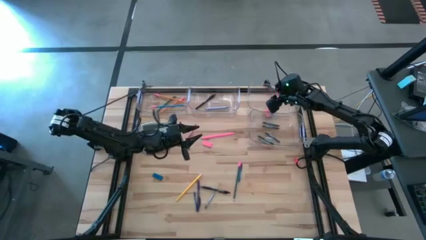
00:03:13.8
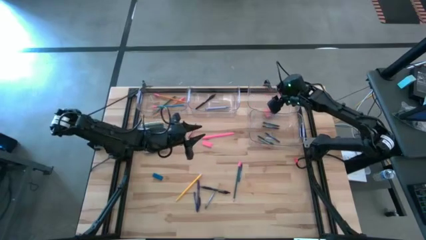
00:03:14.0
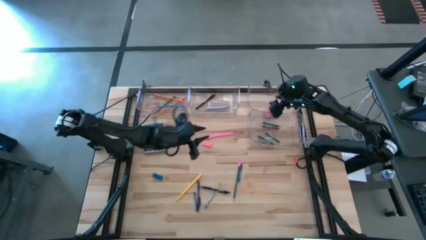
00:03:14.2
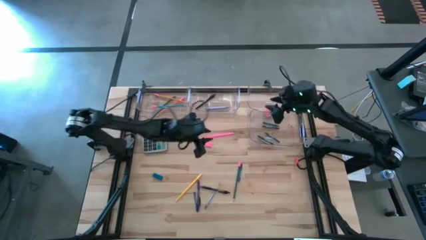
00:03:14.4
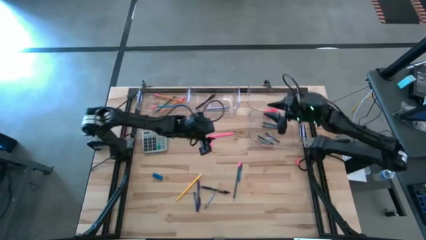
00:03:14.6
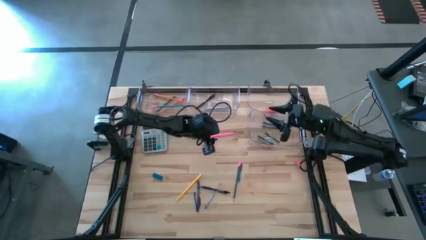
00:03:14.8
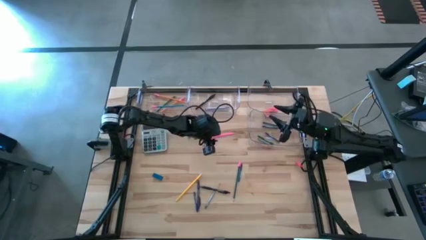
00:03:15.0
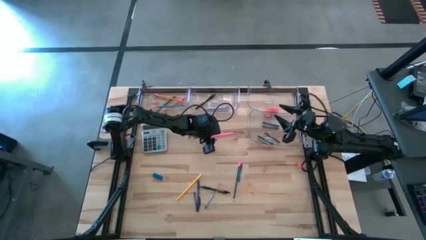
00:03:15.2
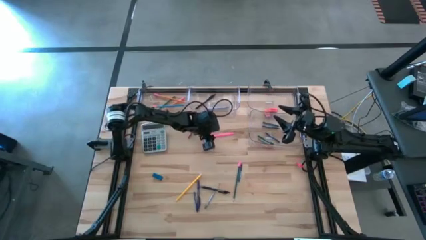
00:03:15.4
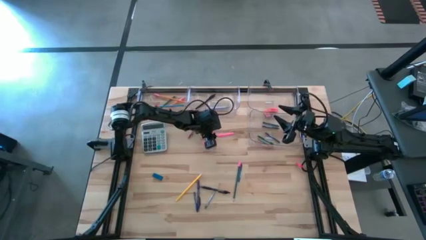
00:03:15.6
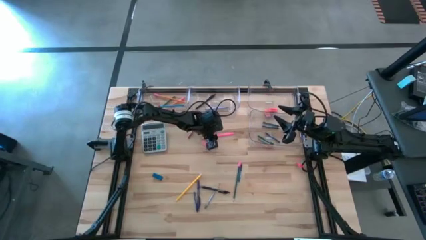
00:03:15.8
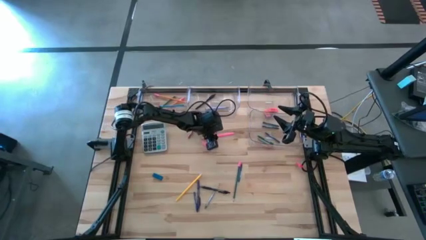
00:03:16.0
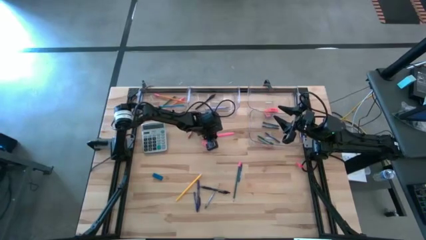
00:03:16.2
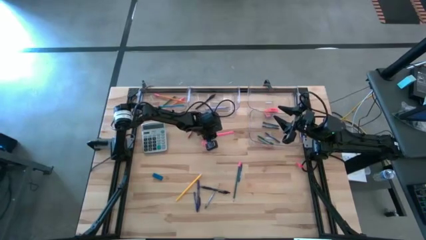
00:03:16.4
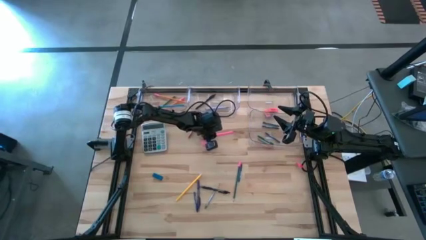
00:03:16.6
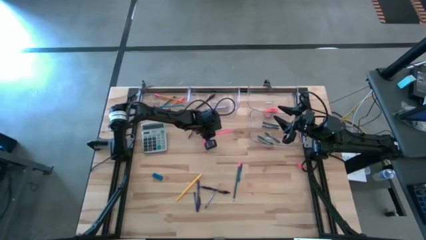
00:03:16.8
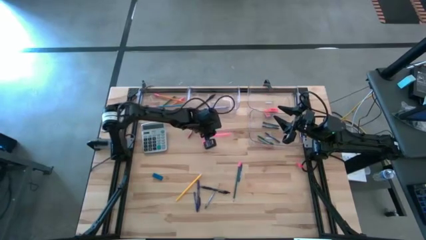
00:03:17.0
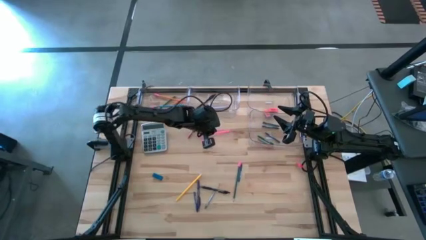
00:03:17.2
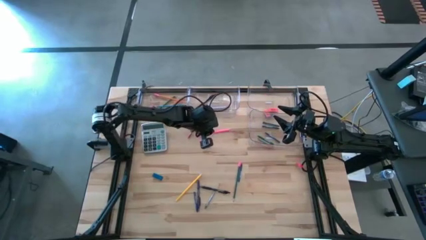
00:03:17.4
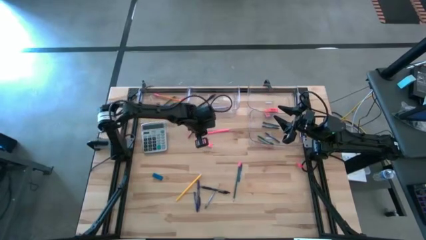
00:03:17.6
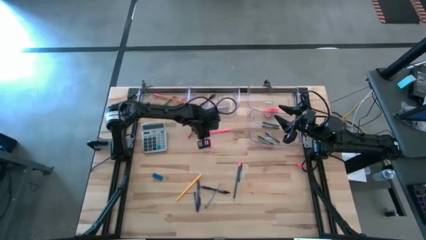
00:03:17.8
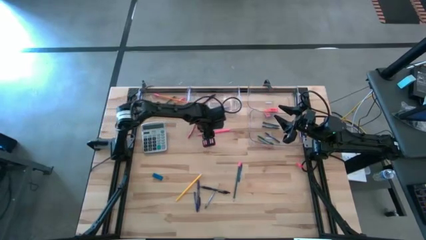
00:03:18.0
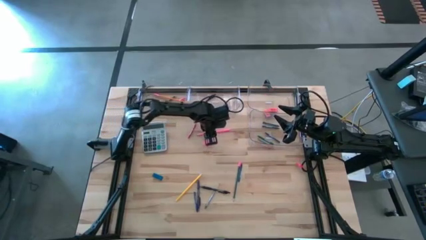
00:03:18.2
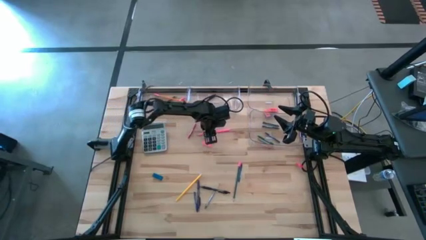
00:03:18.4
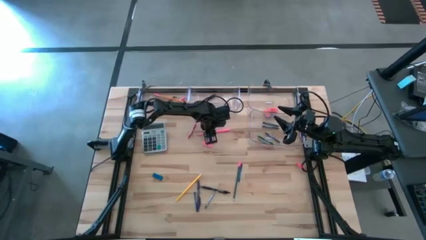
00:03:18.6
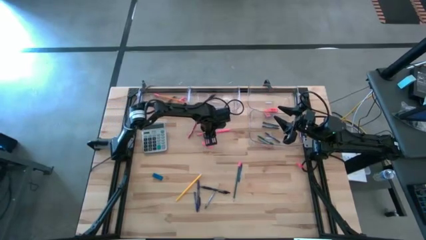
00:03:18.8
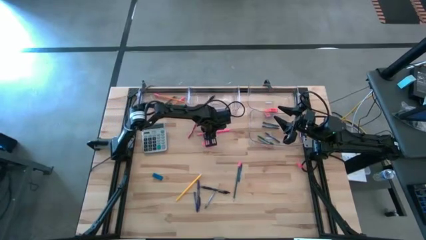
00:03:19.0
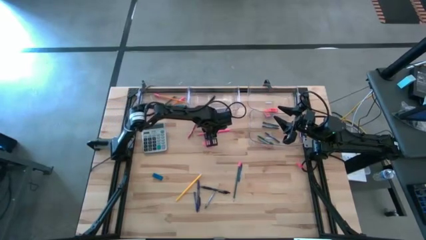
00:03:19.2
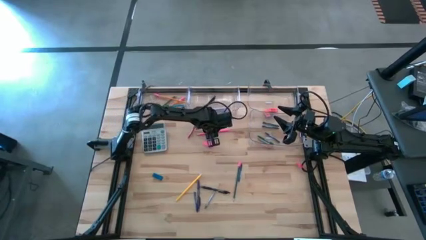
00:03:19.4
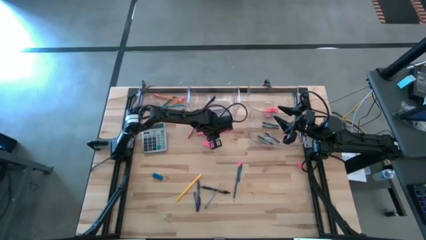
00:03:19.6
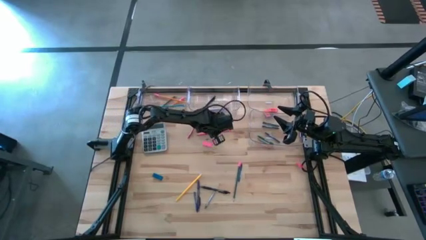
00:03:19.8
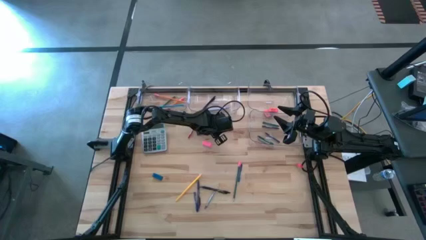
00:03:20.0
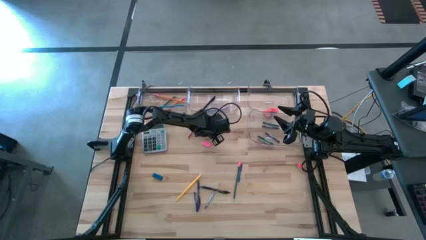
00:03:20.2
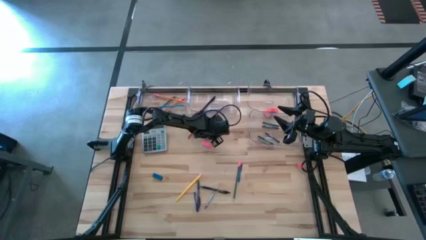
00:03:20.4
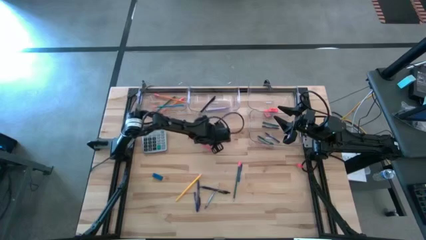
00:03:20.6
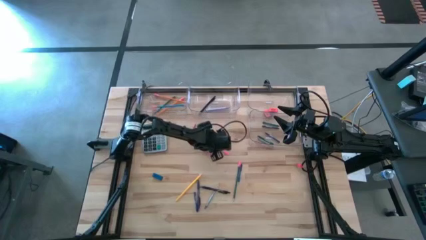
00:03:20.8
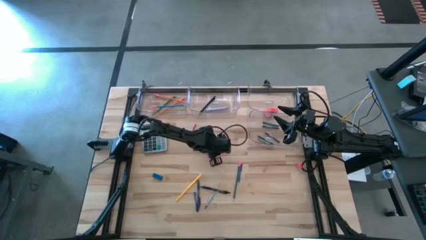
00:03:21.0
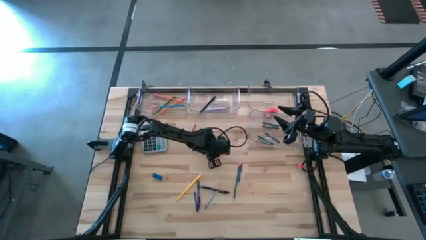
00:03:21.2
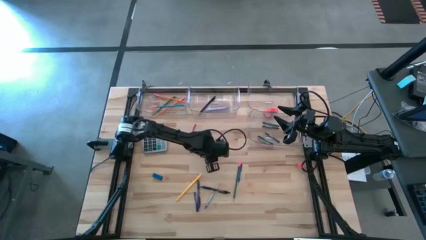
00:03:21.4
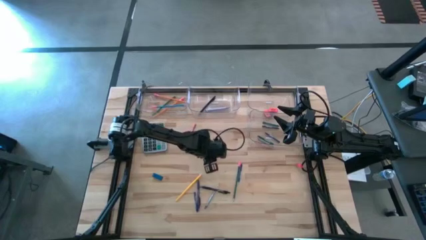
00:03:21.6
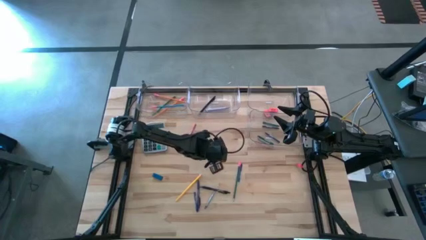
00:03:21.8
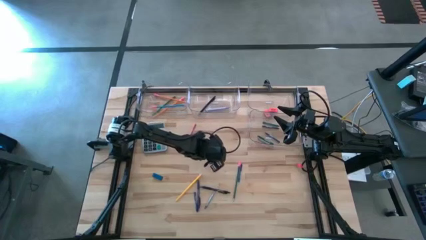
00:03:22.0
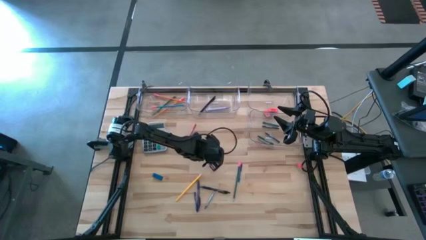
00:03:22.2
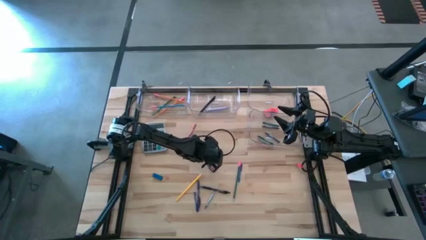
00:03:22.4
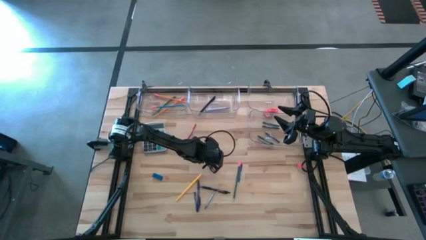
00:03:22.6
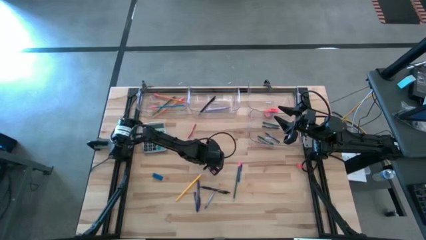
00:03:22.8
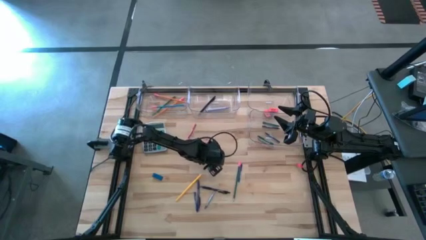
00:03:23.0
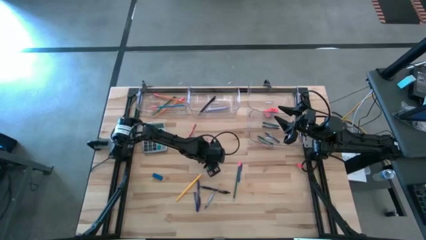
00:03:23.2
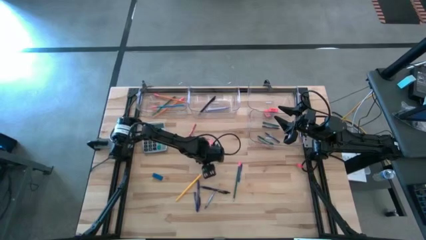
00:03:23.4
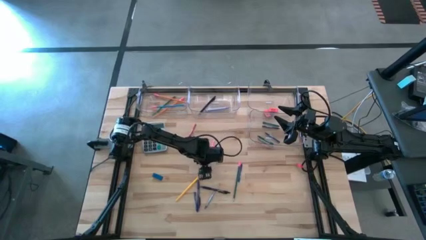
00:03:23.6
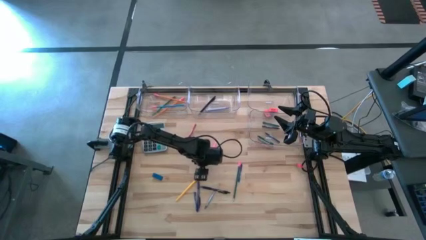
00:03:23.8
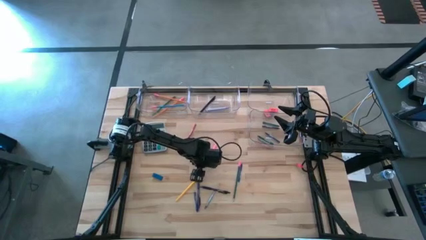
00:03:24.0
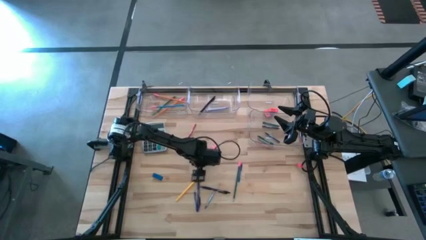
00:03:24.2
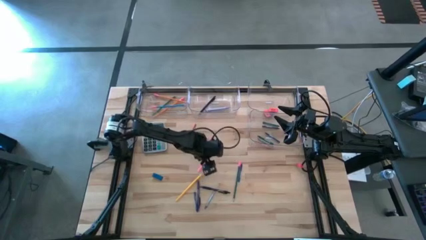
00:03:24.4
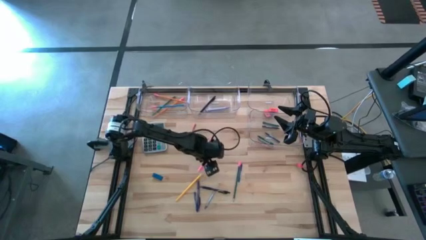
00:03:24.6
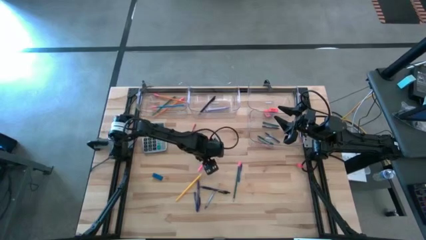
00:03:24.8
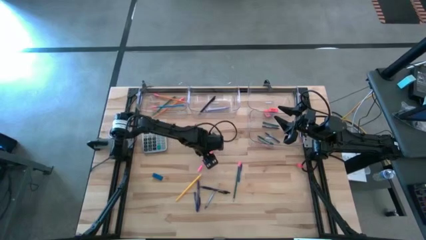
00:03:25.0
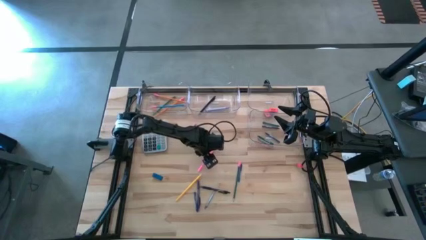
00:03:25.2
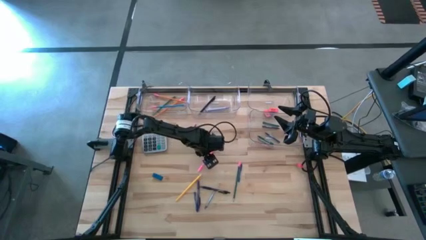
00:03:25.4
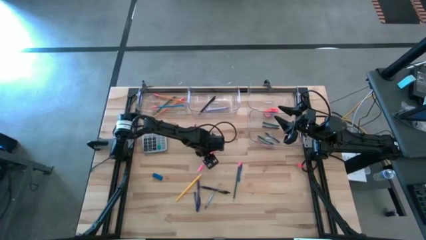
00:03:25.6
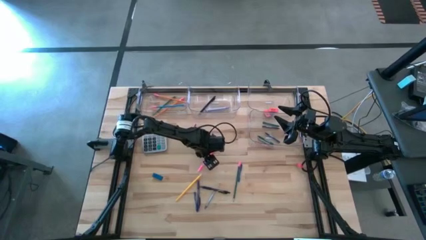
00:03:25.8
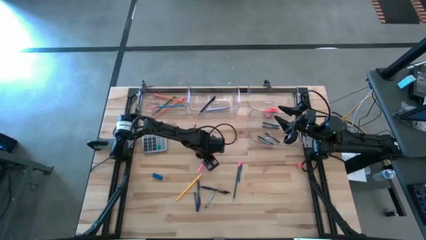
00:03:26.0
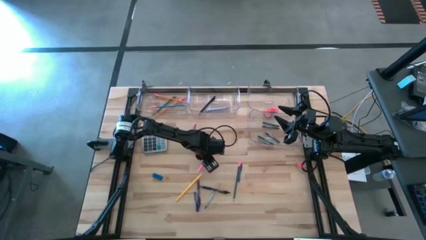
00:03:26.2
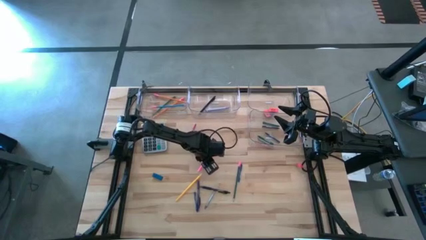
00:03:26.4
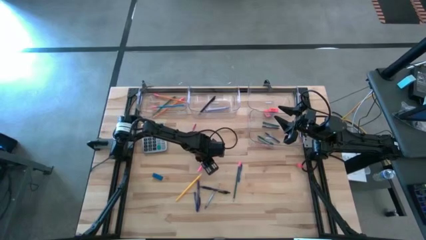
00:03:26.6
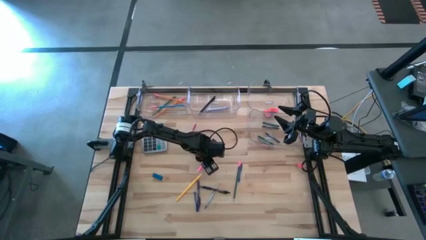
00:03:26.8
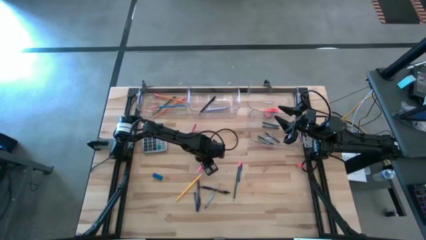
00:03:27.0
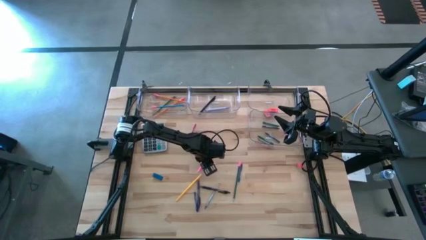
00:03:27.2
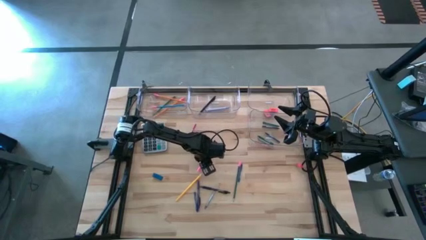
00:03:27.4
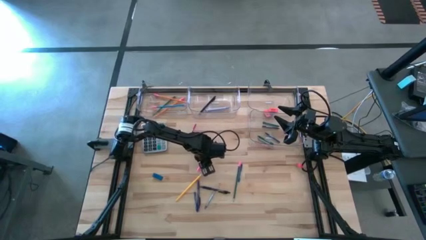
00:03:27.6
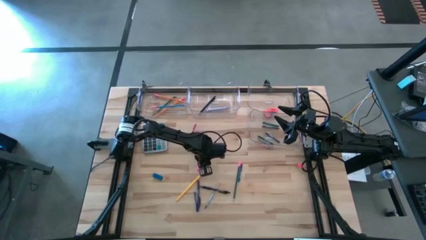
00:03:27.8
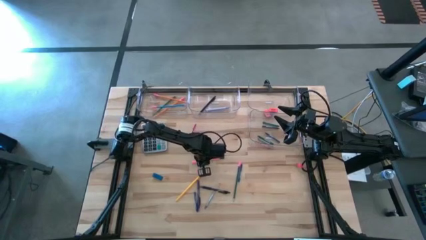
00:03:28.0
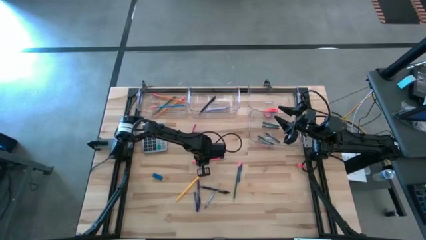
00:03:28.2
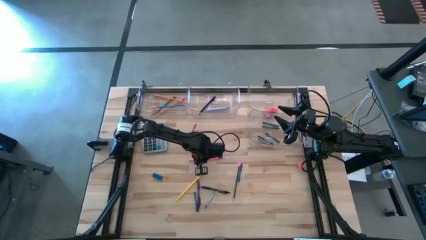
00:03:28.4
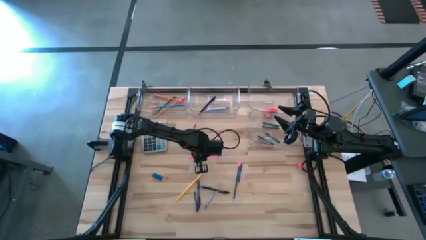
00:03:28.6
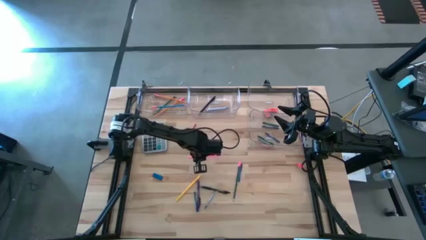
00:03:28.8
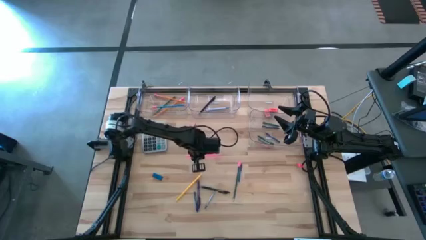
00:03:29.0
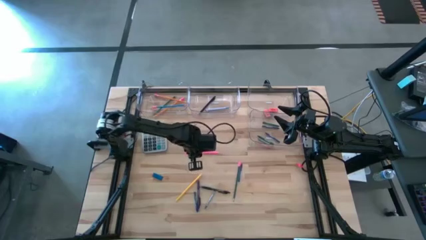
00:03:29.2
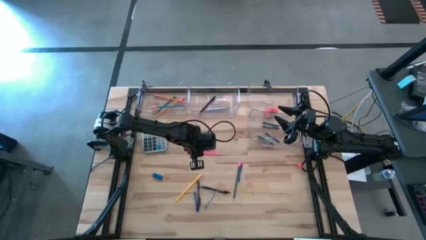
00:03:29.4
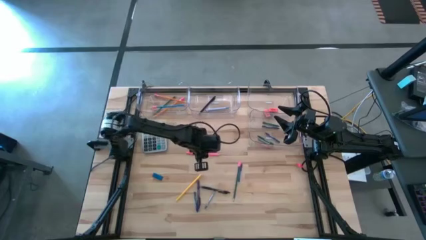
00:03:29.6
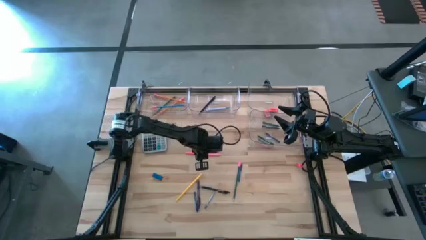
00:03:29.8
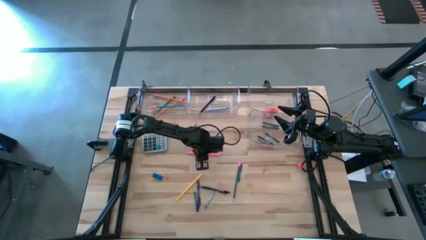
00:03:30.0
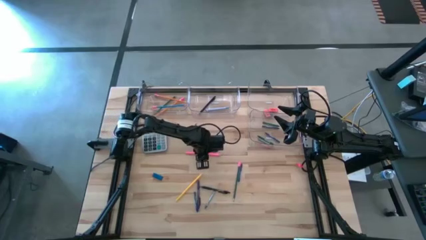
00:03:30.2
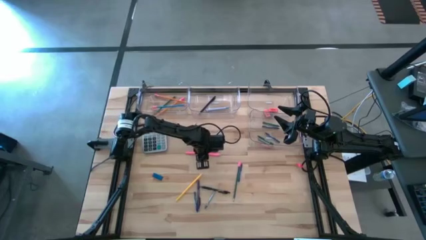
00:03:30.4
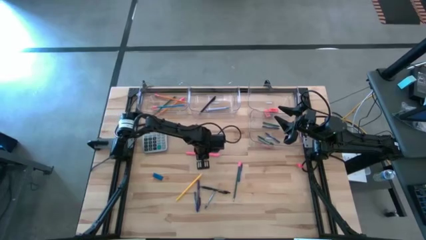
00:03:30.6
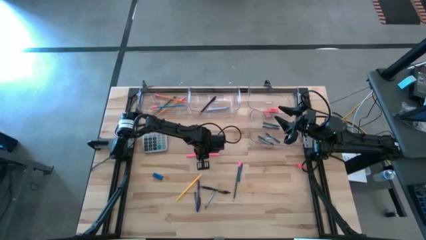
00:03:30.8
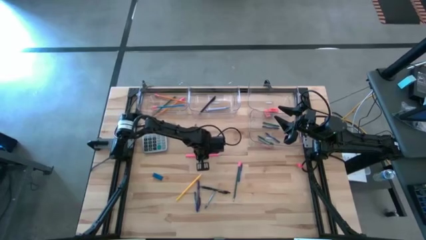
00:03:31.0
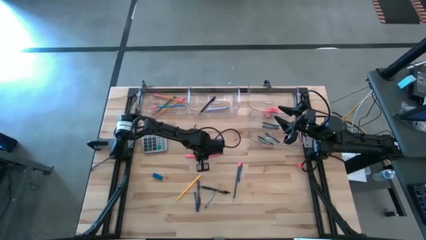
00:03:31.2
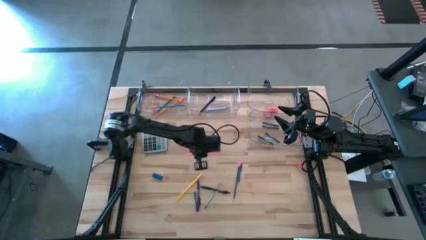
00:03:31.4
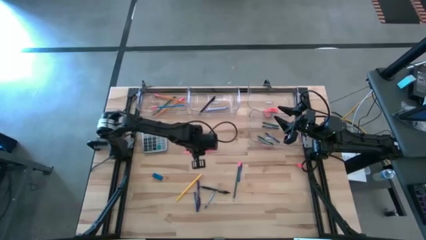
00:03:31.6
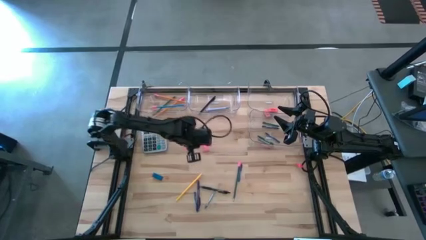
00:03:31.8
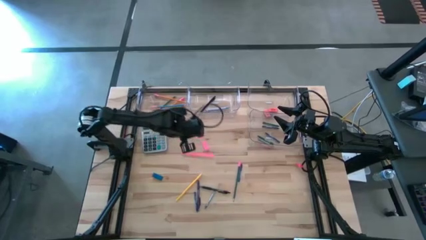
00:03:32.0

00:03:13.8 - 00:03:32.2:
Task: Sort crayons/erasers/pens/pencils in bins
Put the pink pencil into the top left transparent bin
